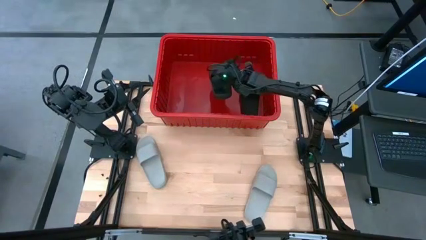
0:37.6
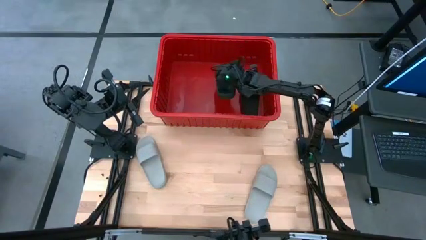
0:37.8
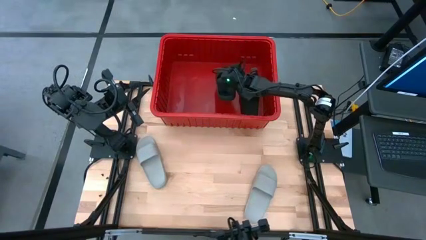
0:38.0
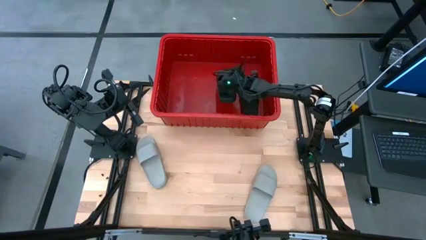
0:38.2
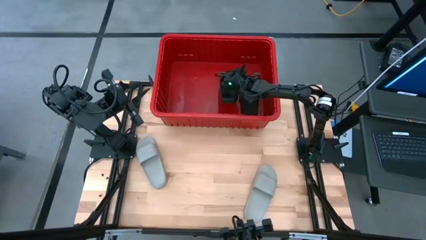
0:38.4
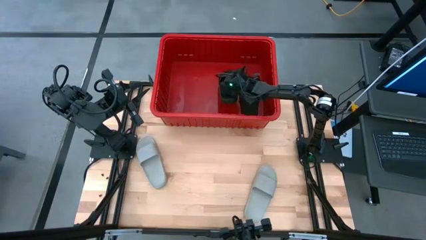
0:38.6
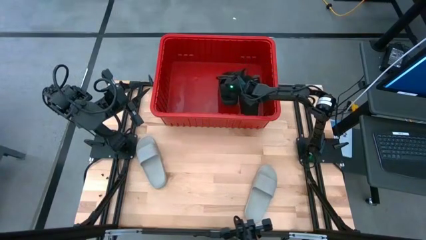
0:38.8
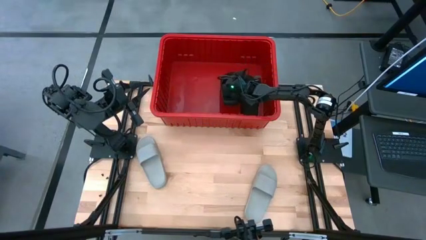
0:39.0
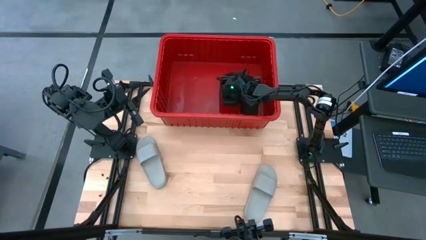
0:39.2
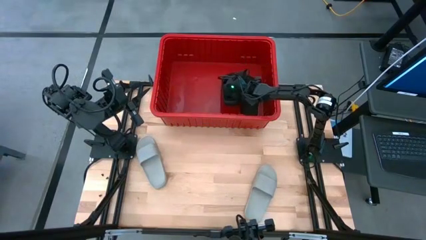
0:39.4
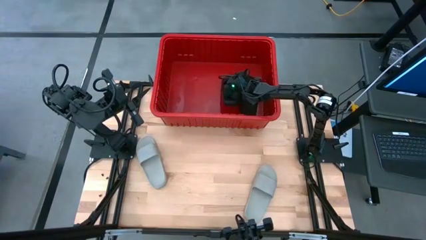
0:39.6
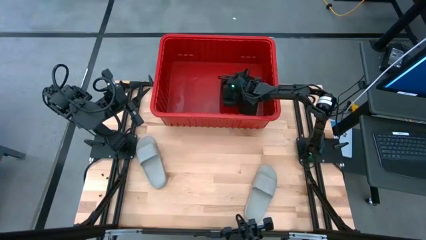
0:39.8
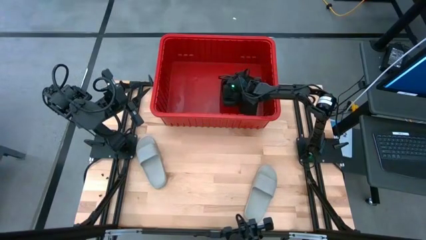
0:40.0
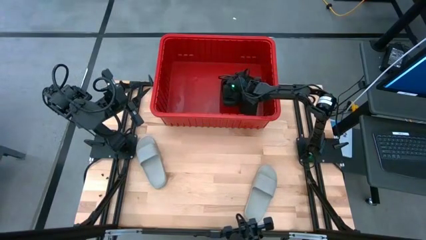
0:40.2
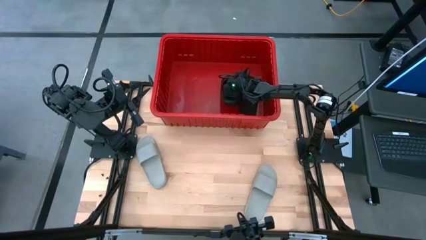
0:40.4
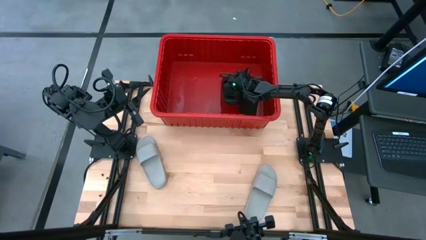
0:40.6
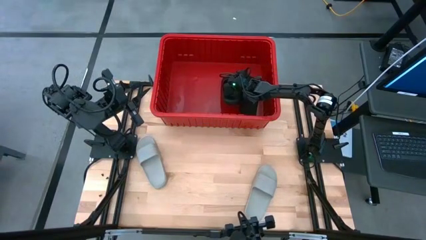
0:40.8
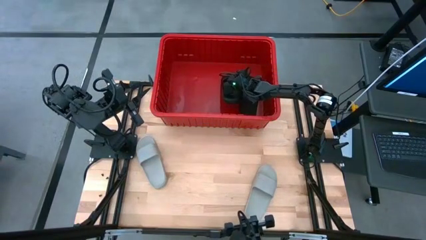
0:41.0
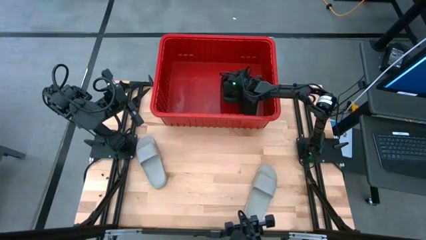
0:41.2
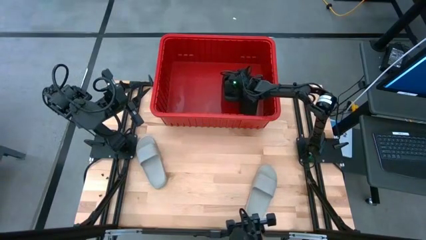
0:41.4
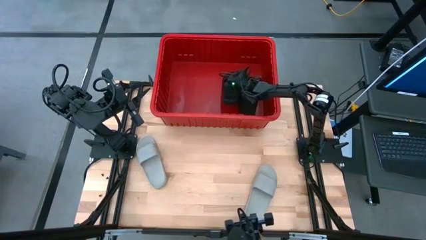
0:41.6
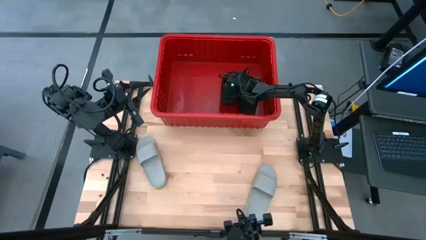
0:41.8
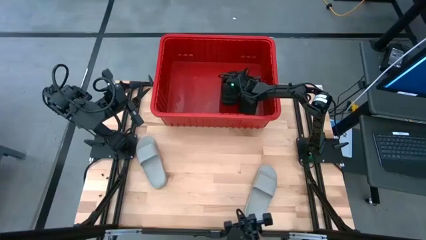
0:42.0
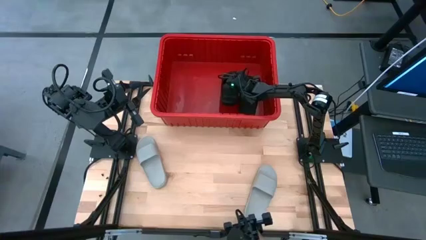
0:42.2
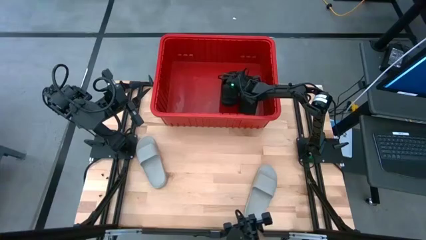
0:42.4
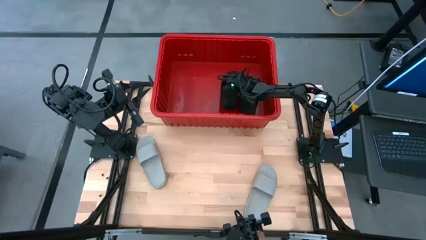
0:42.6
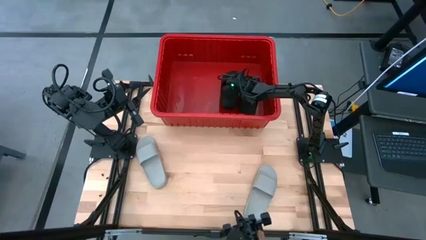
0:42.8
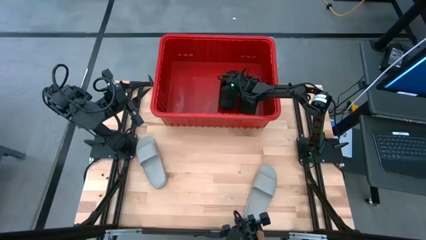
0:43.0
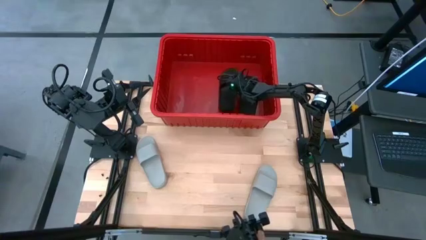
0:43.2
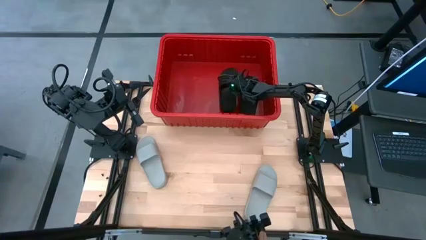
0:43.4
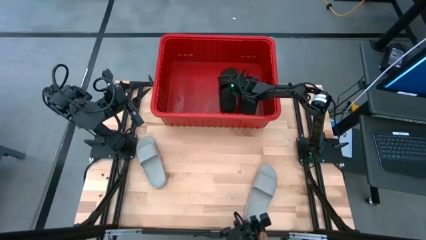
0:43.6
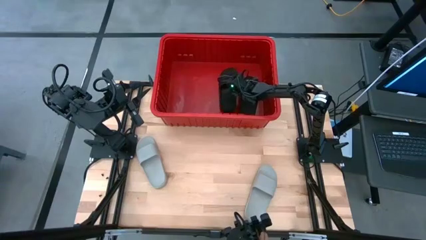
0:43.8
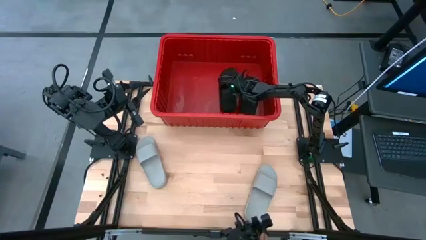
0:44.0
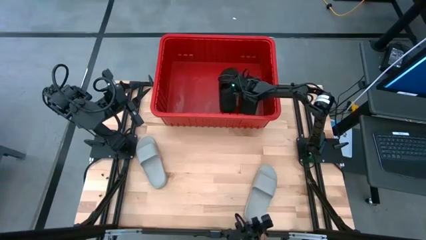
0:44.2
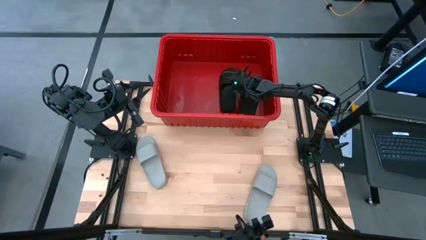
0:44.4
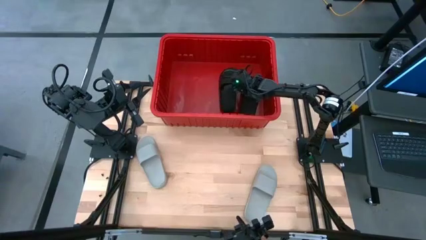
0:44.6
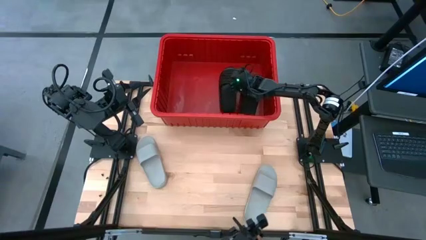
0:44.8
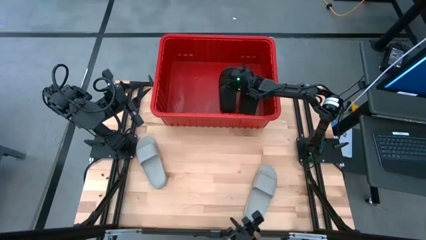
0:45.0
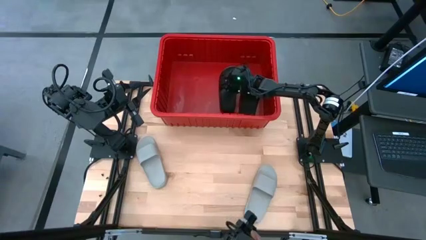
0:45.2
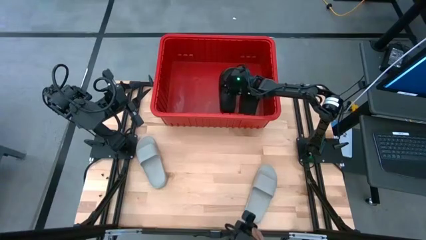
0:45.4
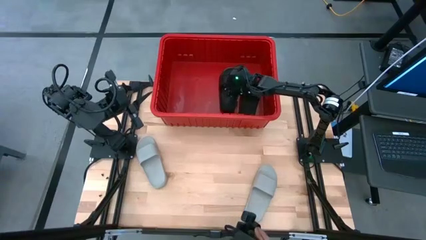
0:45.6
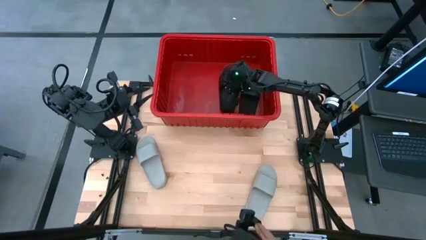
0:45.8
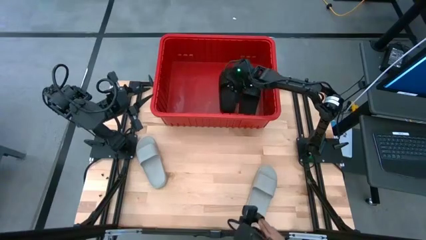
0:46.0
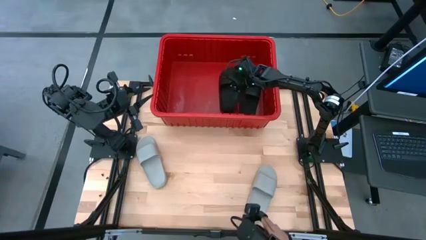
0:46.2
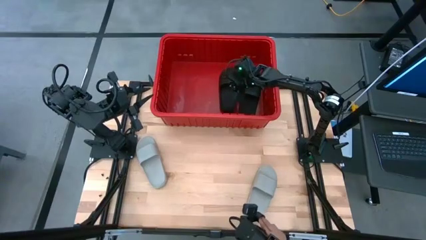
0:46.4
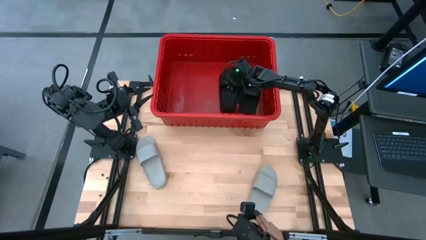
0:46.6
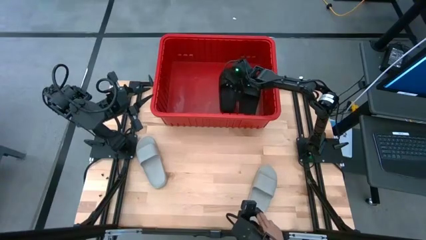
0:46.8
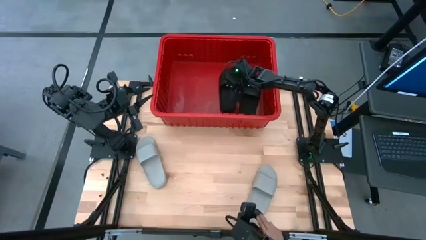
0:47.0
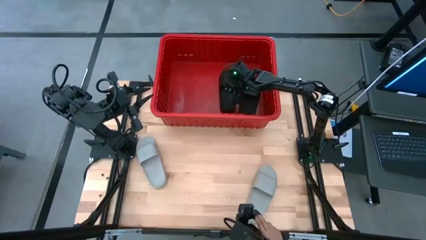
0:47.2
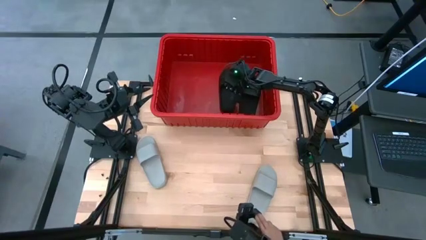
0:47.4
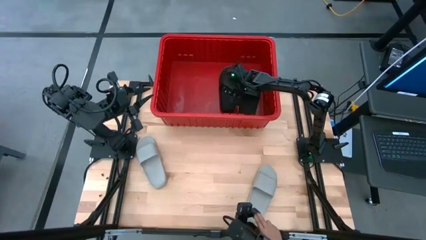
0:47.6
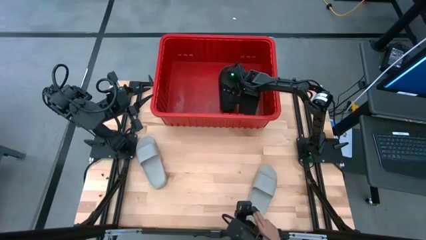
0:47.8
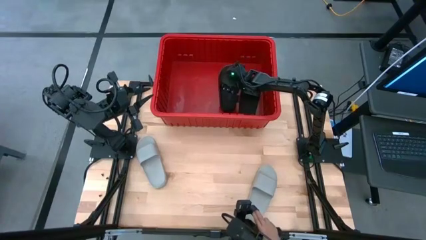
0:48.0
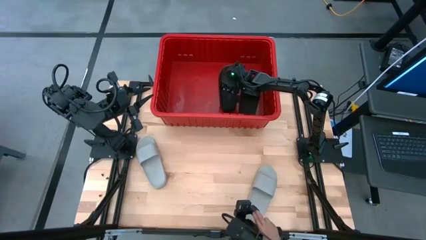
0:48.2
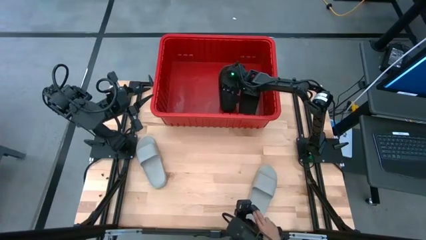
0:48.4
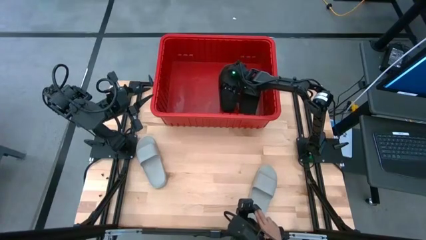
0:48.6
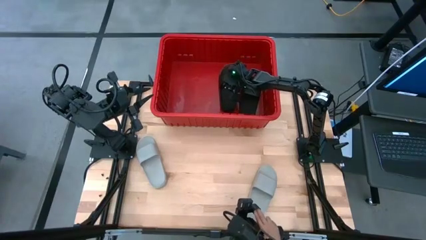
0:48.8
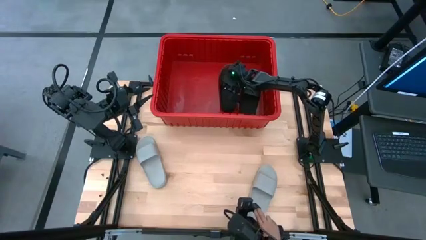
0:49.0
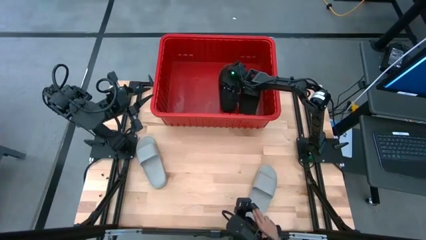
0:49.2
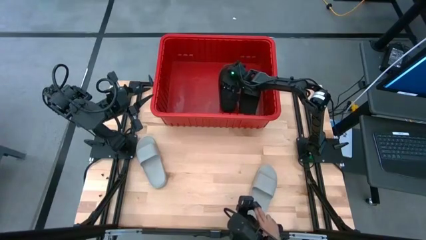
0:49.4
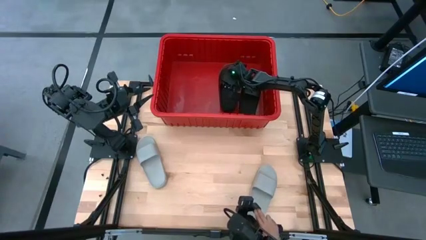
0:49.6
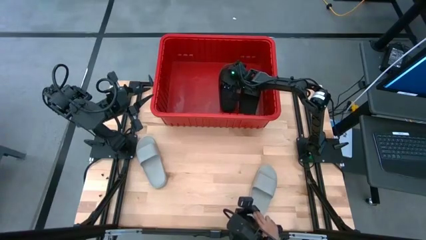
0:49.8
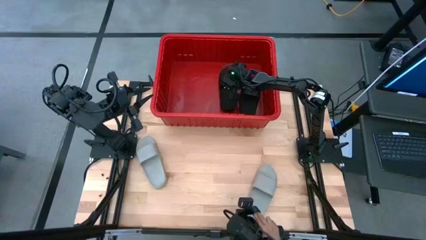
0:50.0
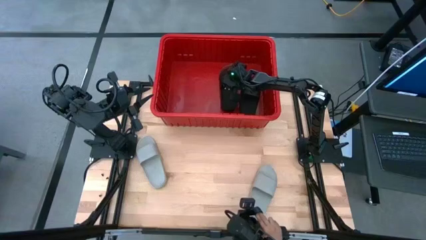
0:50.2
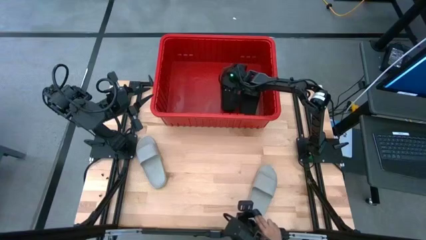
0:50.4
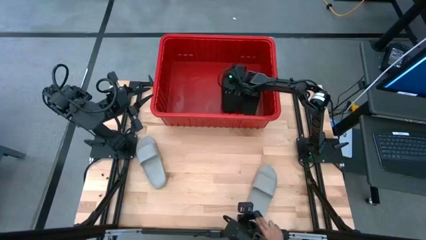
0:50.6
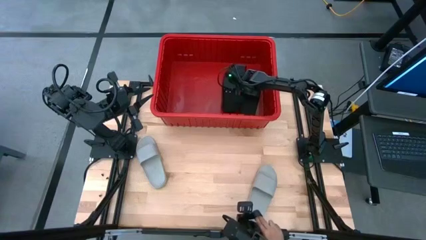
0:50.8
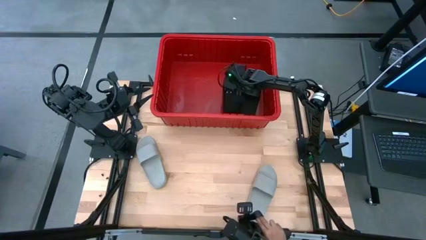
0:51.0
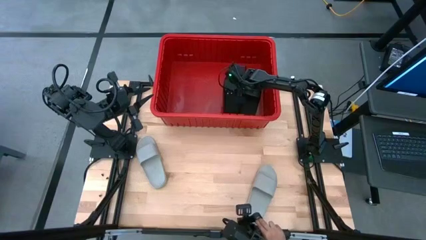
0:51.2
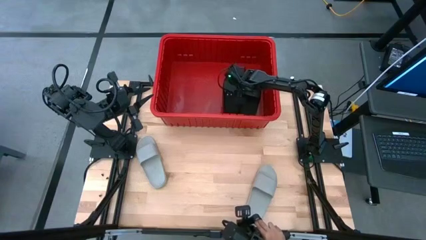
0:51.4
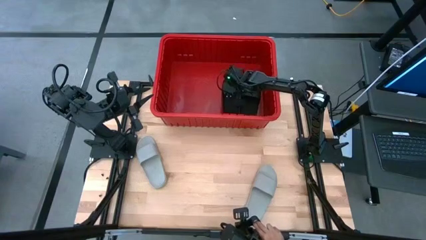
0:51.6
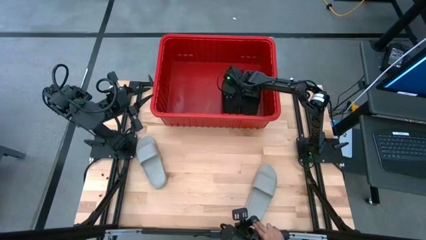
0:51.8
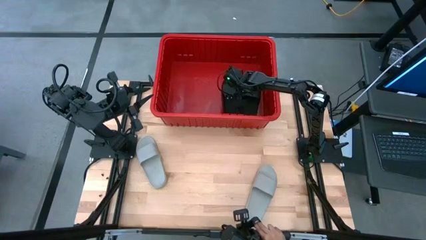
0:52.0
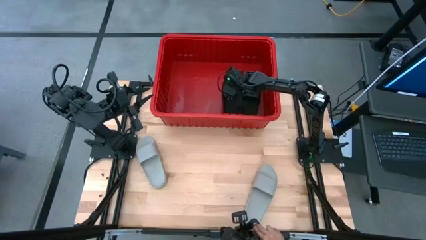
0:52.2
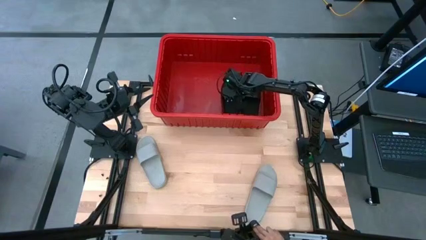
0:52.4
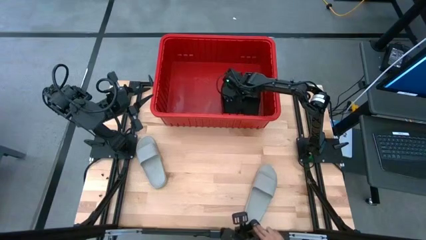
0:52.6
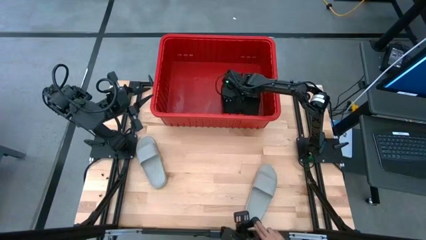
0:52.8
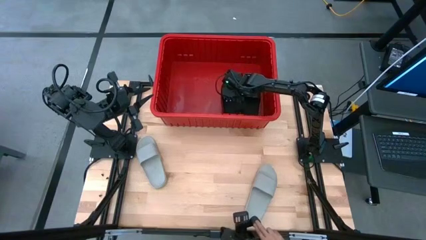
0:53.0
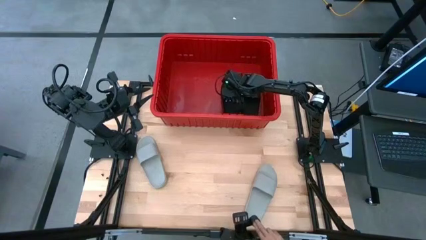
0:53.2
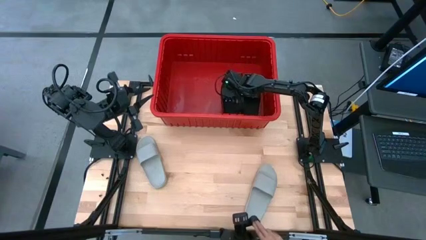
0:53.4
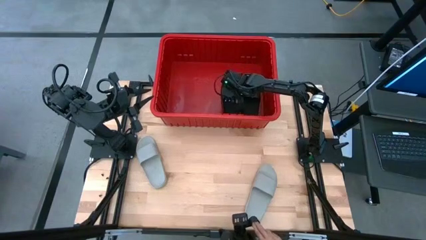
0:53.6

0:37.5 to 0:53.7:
Task: Pick and place slides into bin
Put the black slide into the red bin

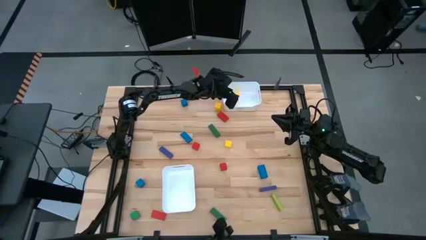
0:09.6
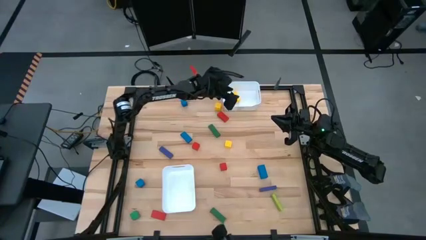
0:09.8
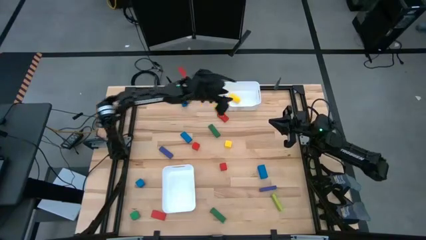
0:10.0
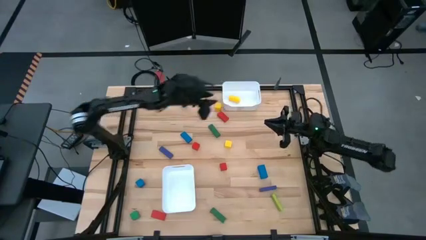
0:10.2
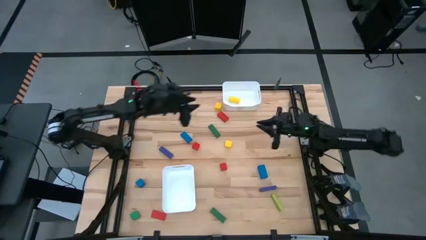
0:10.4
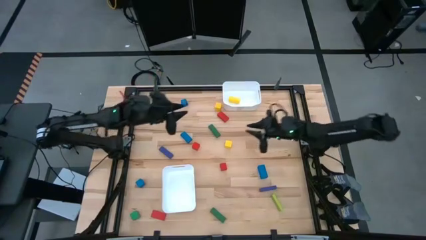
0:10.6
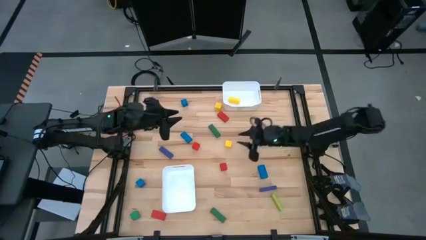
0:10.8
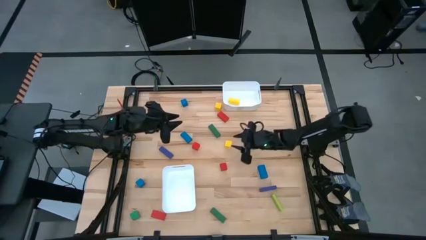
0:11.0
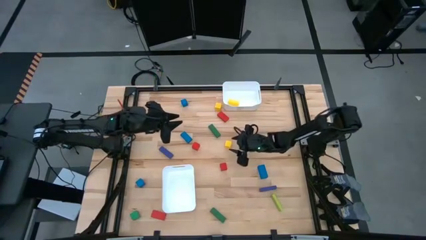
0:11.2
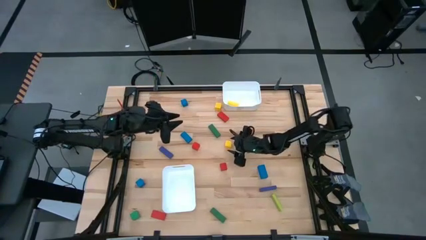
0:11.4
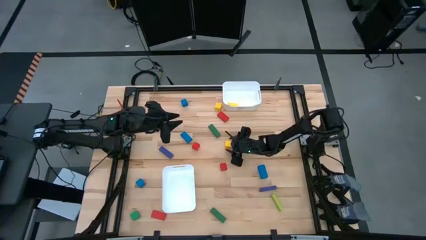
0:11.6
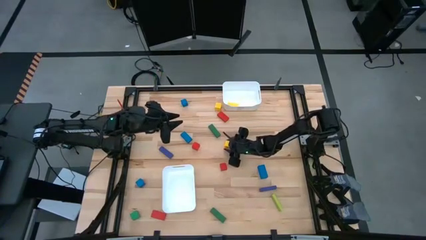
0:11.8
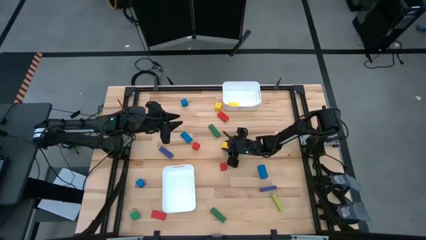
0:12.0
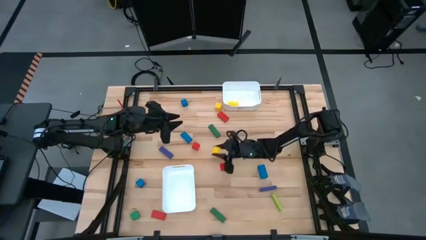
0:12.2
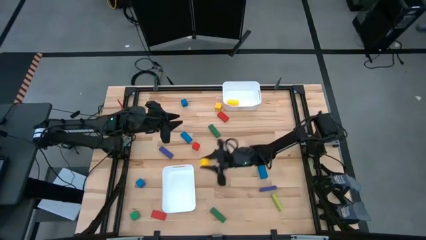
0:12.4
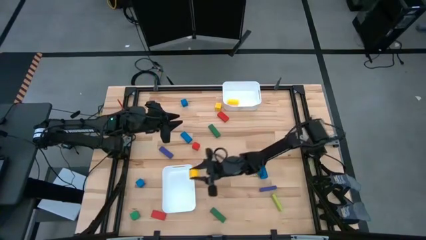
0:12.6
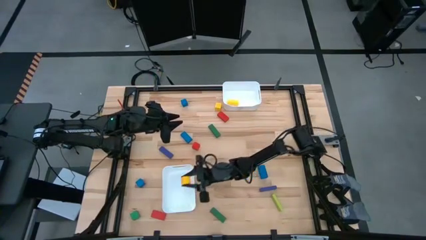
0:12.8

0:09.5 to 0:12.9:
Task: Sort blocks by size
Put the yellow small block into the bottom white bin
